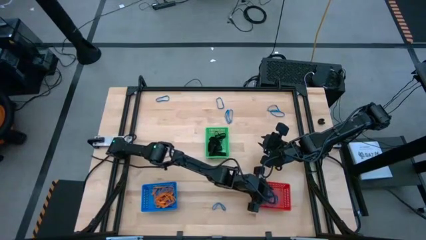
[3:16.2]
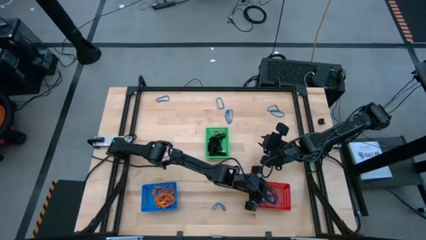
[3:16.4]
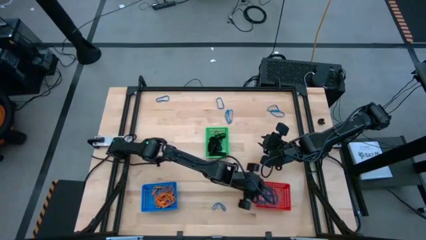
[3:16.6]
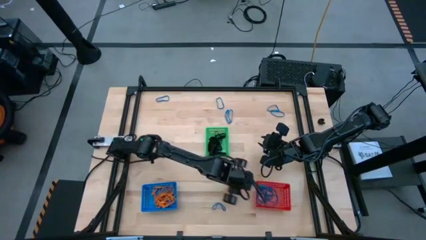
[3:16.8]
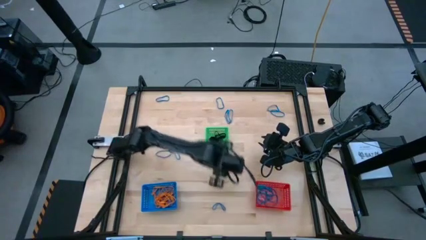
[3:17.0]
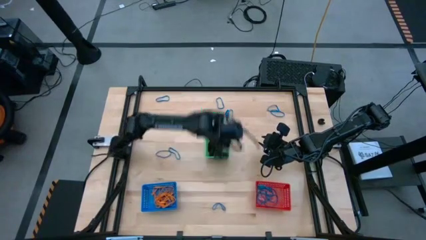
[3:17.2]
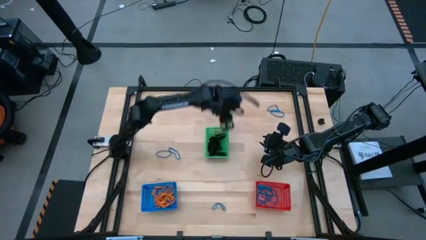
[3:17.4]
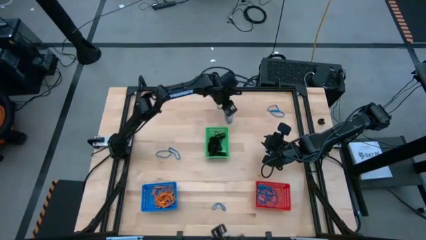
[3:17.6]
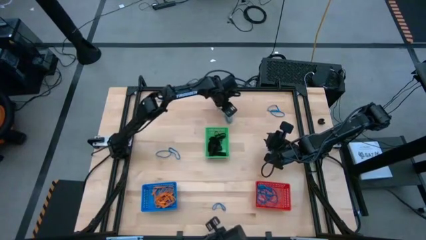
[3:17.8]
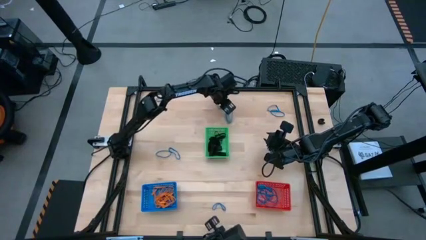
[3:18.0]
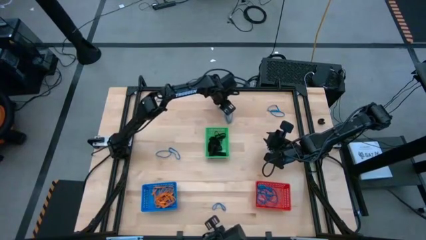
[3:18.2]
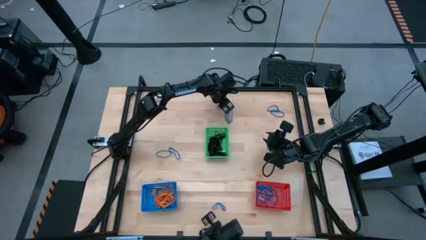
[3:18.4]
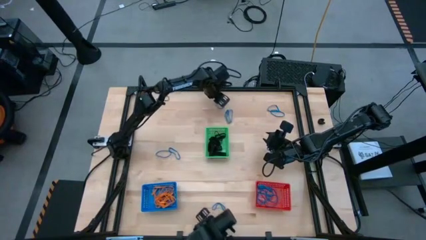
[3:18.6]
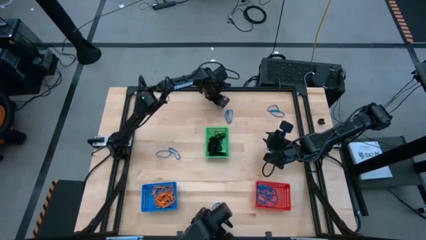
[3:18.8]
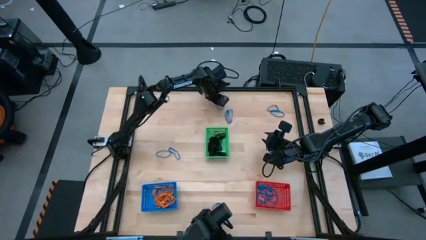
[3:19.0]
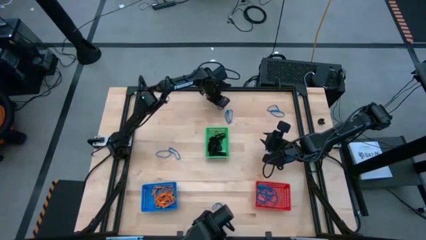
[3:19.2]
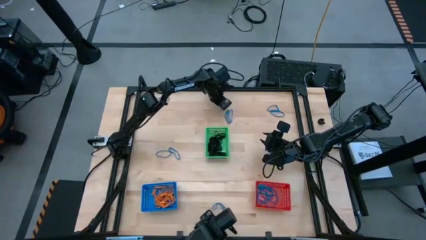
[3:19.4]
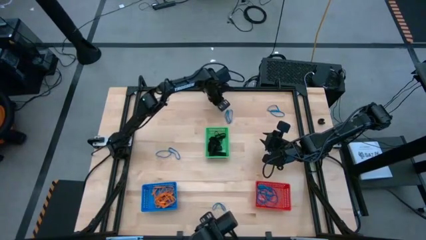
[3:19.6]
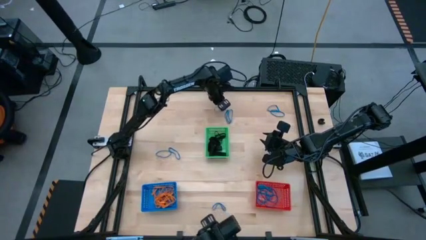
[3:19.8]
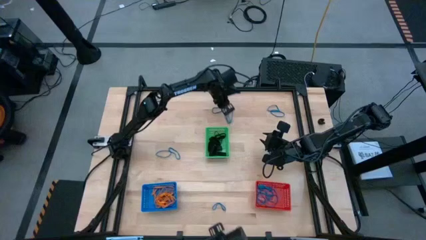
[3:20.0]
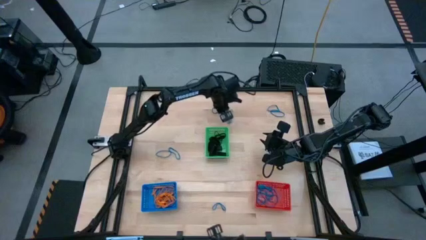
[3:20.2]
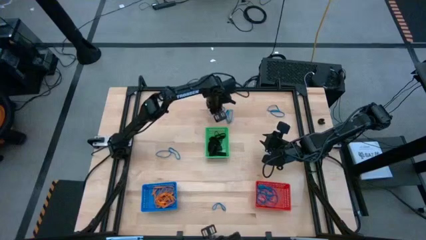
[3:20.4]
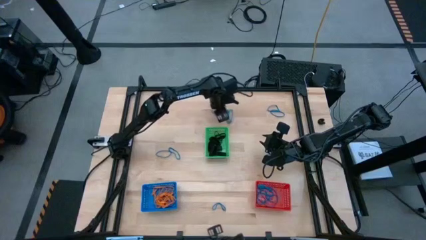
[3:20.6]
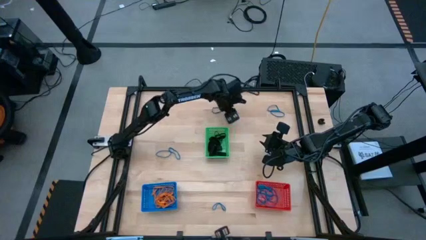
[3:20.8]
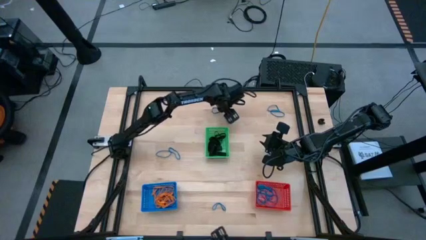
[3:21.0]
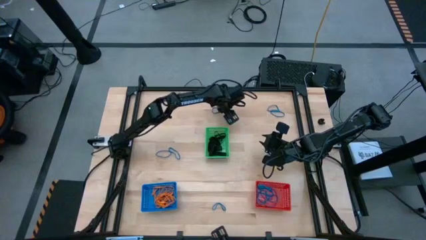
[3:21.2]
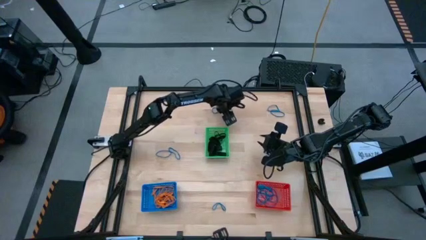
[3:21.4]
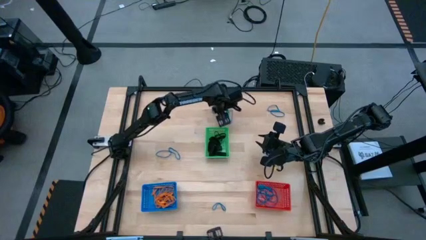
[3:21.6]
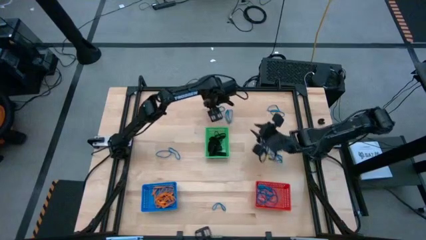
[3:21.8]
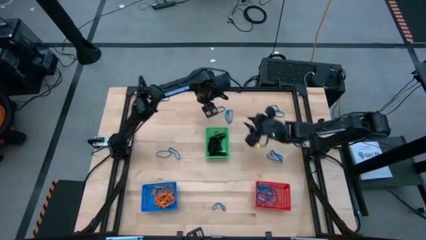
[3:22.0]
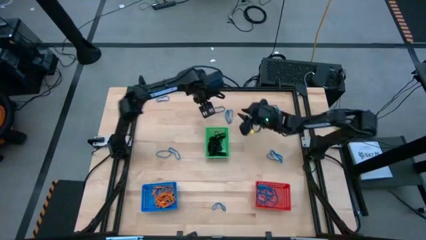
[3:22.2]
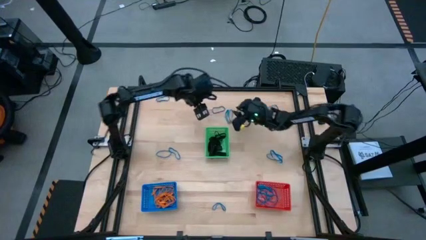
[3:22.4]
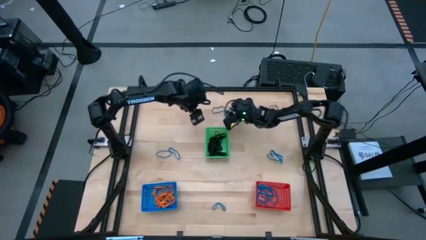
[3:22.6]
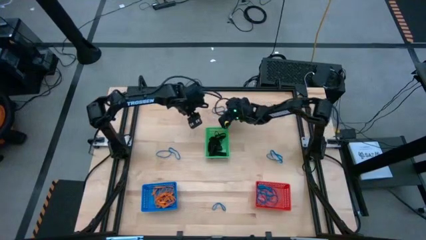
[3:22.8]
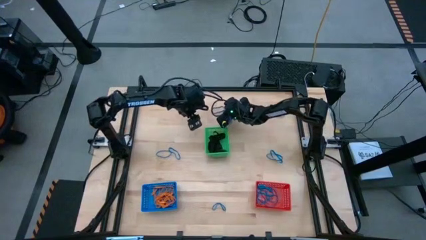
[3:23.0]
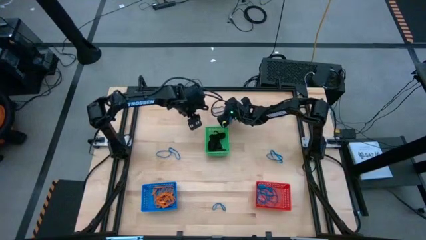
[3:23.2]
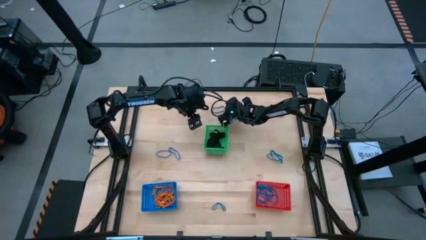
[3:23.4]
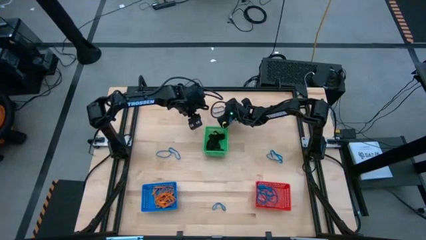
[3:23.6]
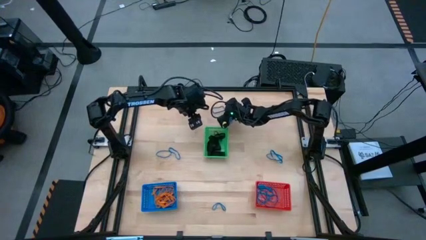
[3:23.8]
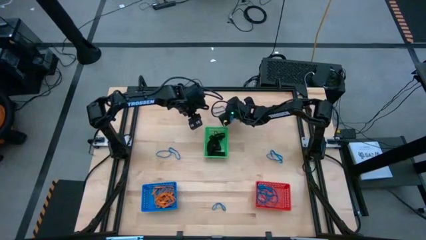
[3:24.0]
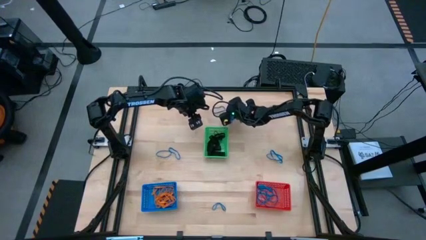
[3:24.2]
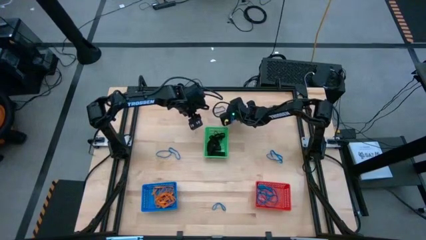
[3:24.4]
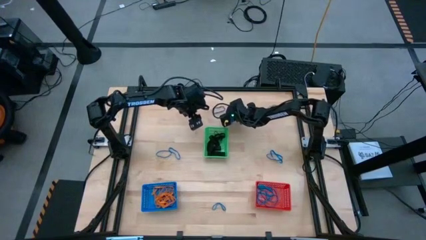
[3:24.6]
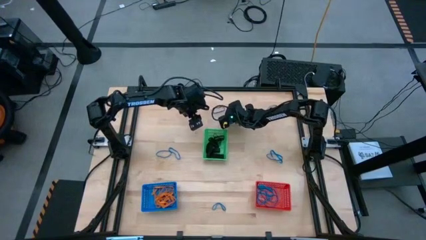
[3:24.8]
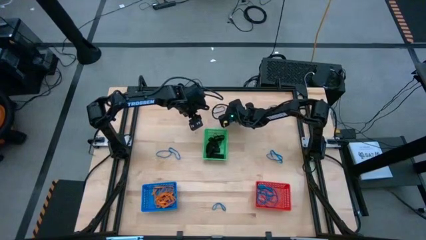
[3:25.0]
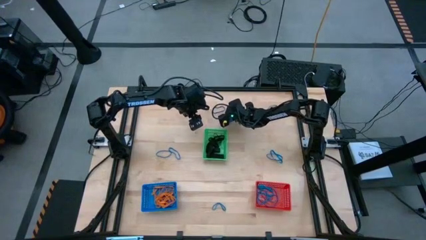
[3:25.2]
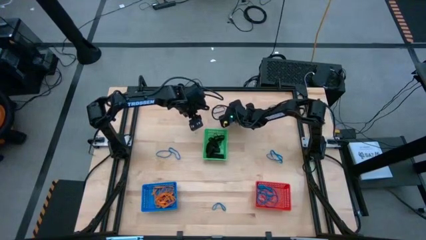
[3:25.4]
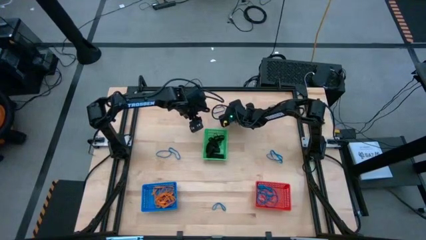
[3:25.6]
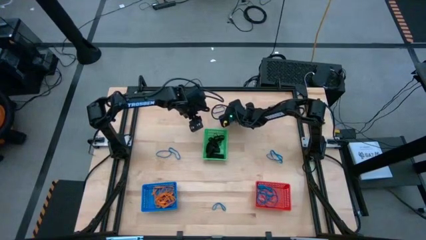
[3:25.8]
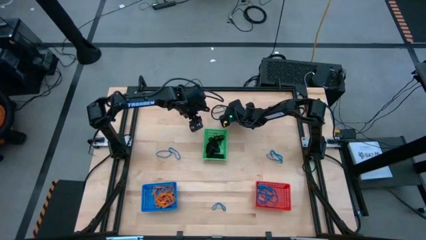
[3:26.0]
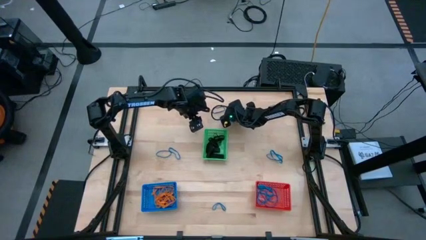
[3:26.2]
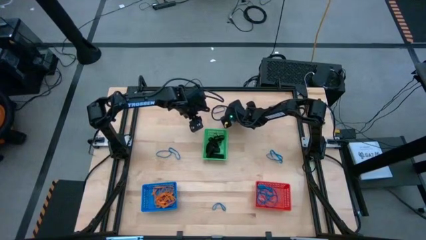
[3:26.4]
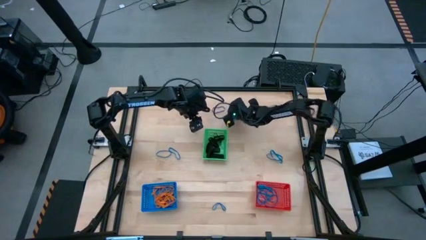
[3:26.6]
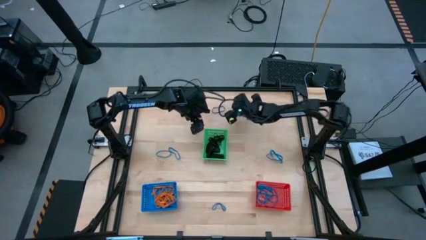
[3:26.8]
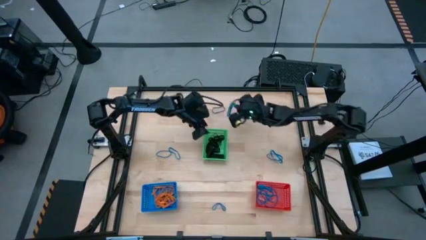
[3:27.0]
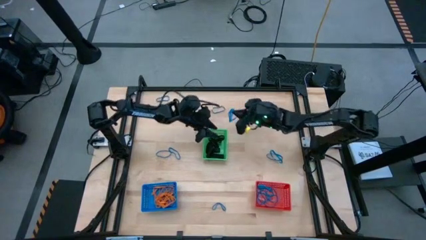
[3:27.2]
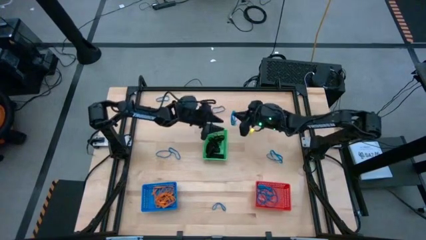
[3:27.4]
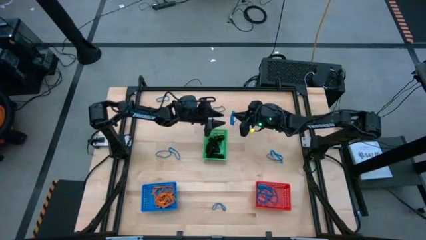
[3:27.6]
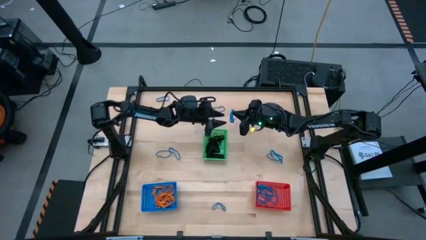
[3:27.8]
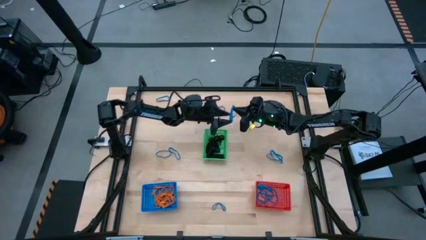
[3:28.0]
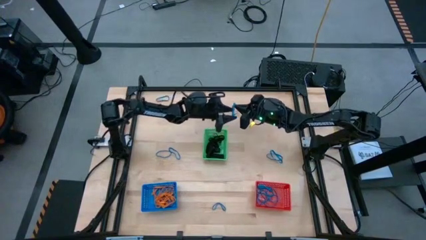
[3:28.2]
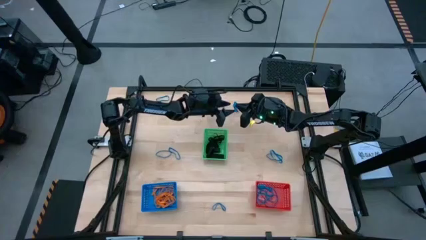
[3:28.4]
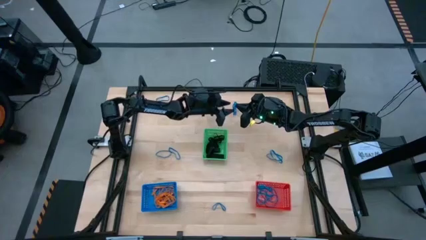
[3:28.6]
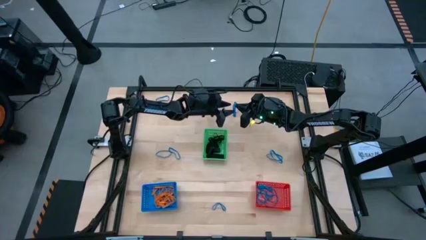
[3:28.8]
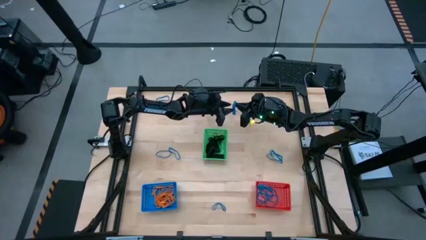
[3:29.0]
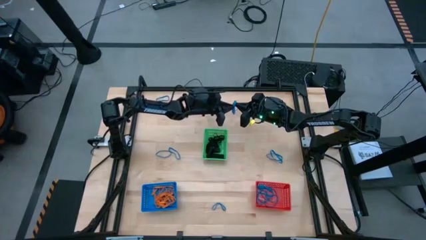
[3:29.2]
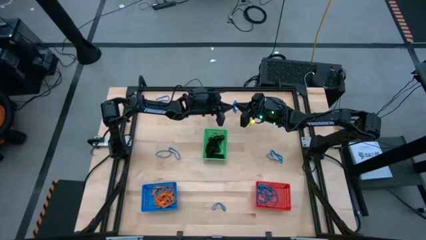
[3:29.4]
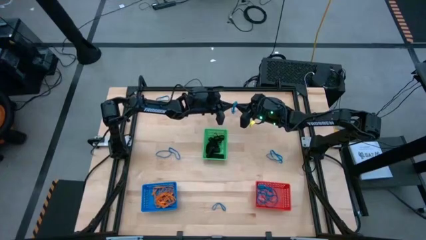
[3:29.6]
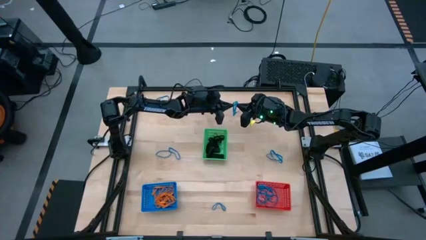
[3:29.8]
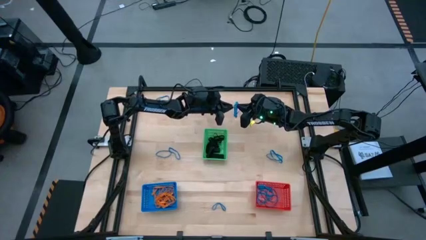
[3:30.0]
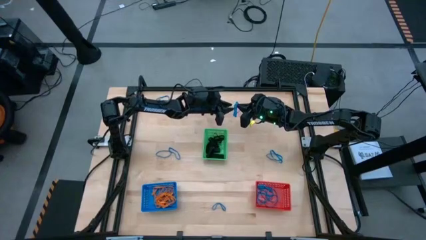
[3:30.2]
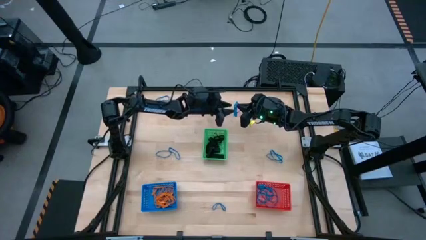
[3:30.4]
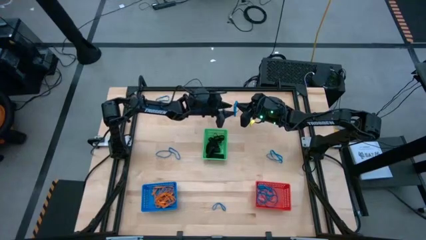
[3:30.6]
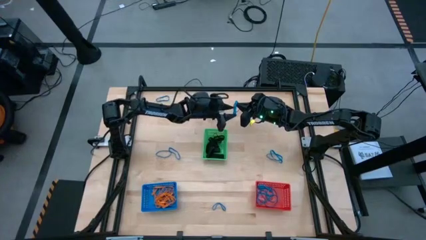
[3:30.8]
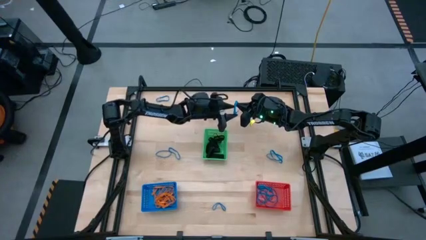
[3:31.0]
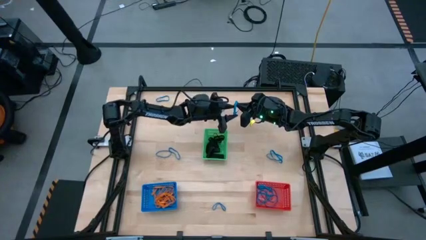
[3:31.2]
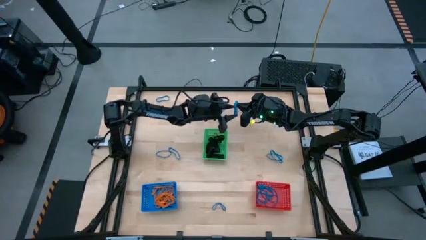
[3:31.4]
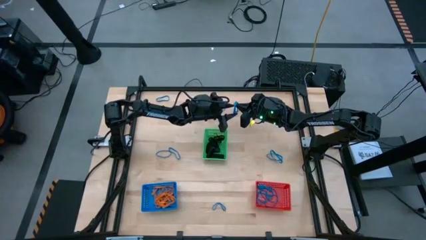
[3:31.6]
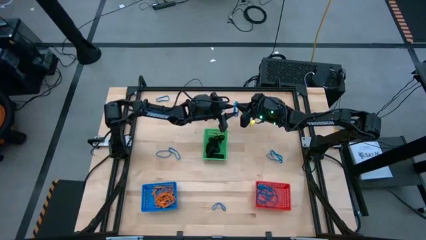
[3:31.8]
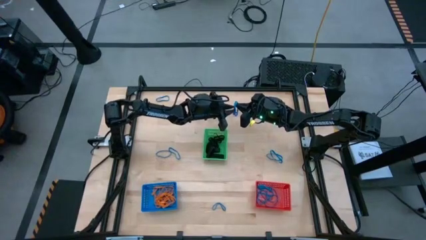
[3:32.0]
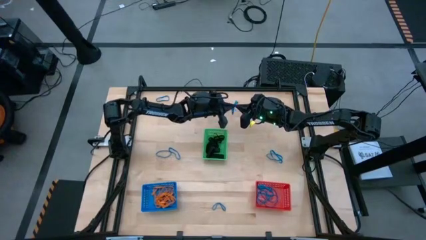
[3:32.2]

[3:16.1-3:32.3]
Task: Sort rubber bands into baskets
Put the blue rubber band into the red bin

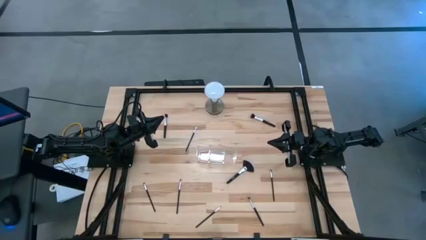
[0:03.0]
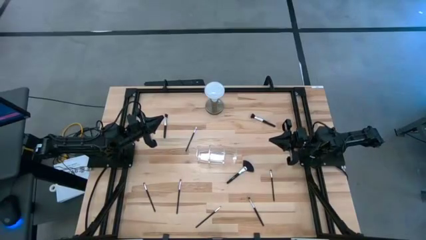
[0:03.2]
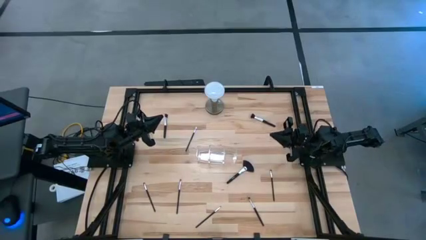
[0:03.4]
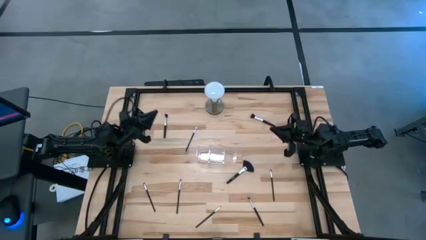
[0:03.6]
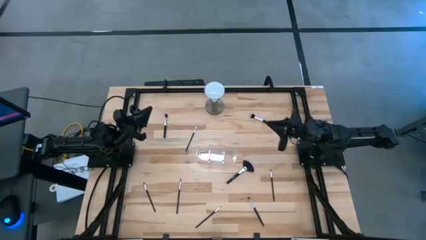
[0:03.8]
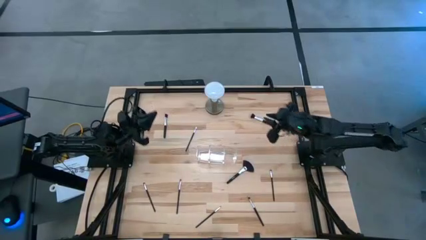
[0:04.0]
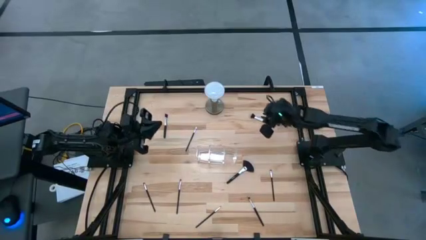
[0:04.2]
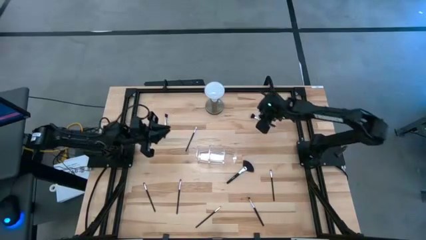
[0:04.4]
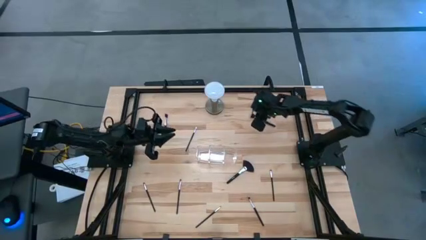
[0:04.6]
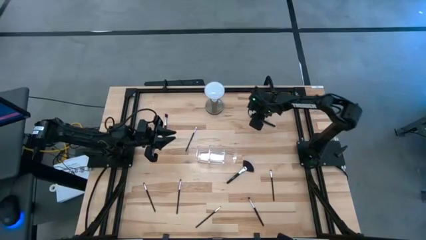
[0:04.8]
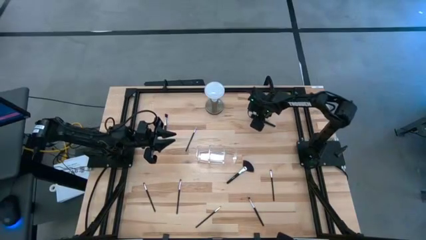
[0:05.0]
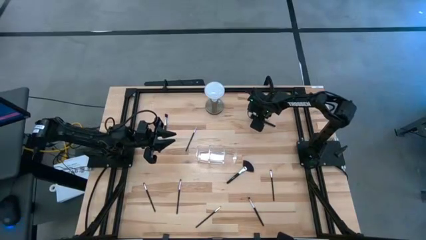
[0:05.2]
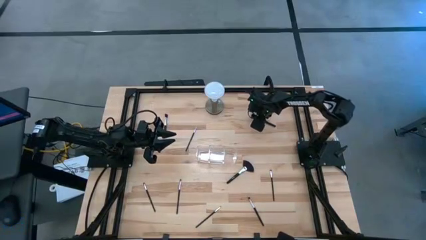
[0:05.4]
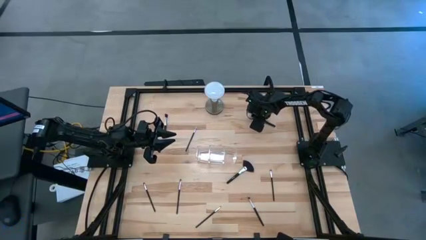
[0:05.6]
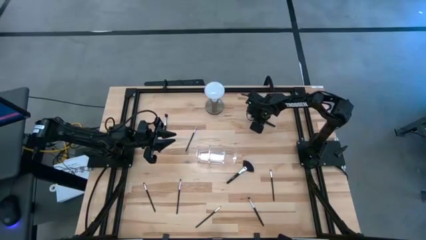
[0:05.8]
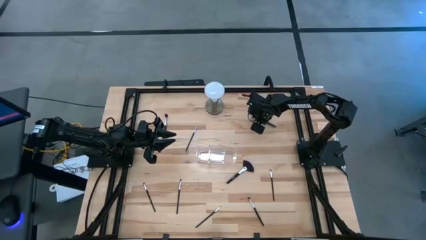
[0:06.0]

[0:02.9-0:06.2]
Task: Put items in baskets/containers
Put the black blush brush into the transparent organizer
